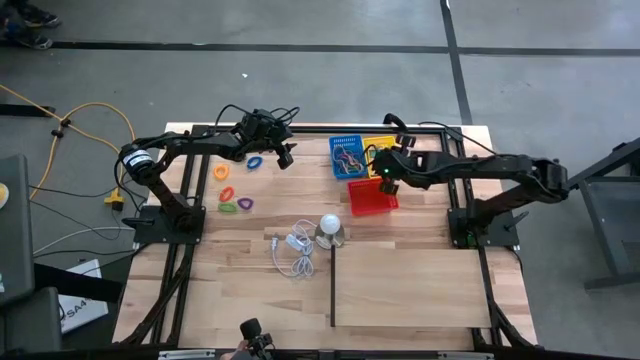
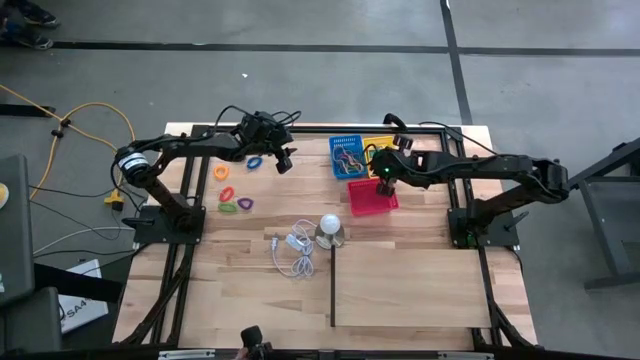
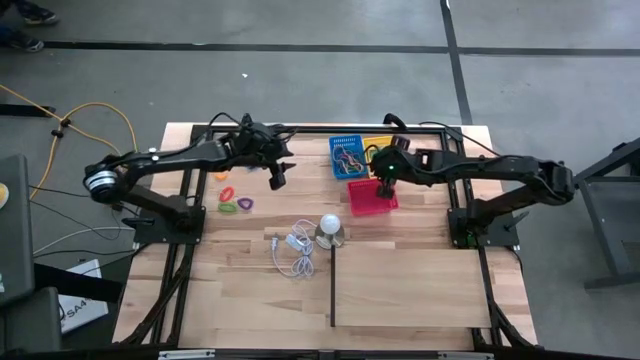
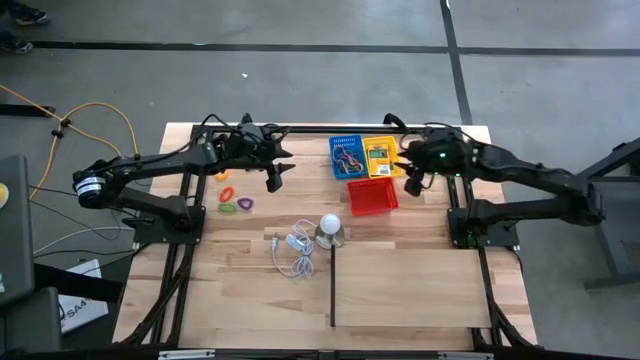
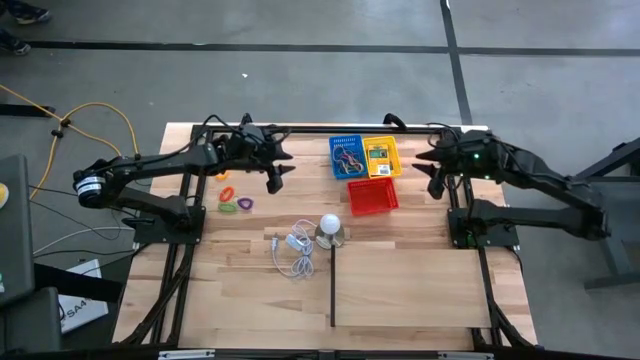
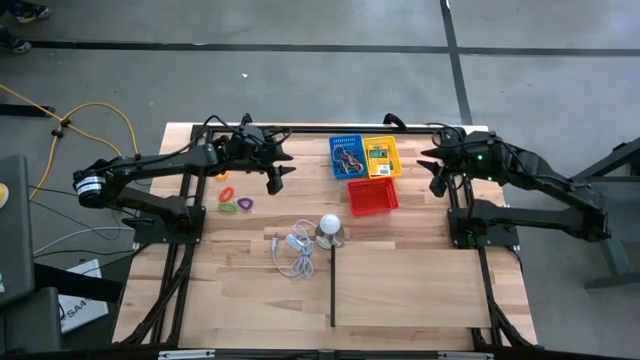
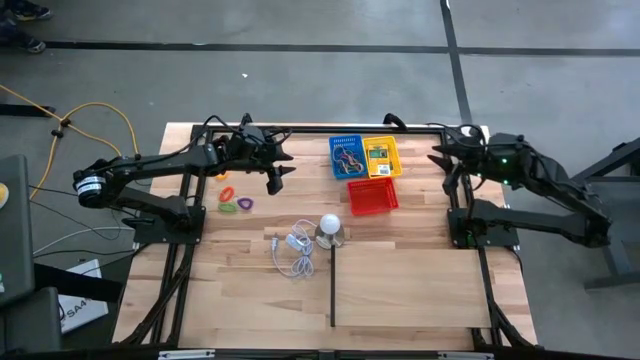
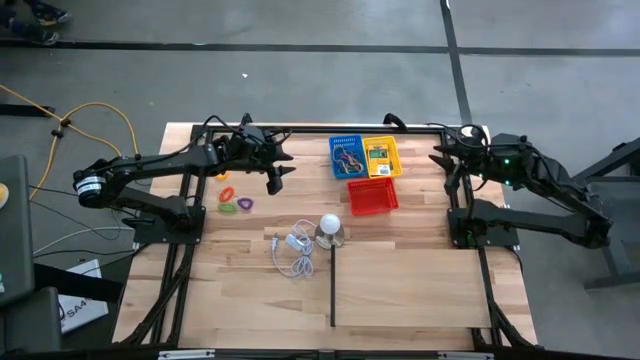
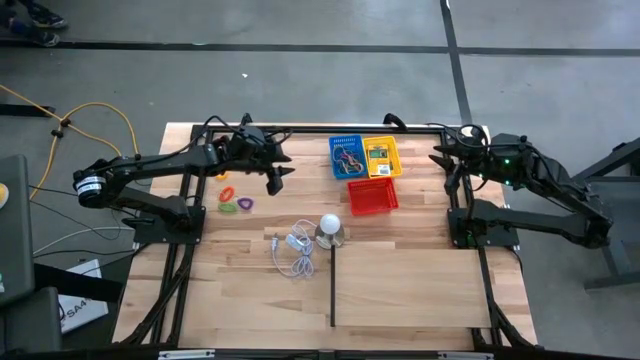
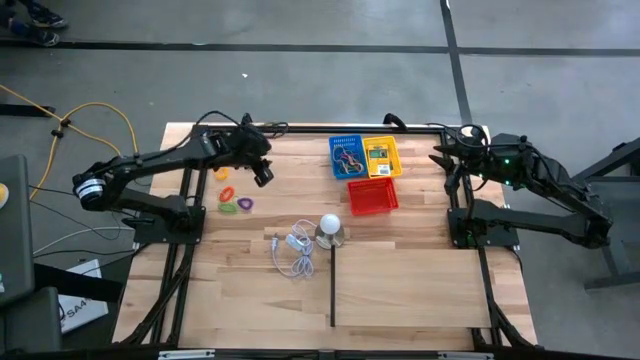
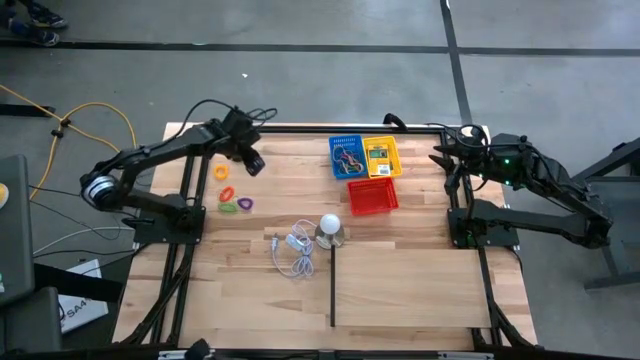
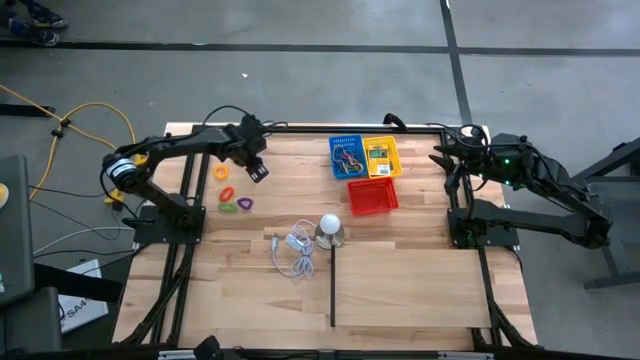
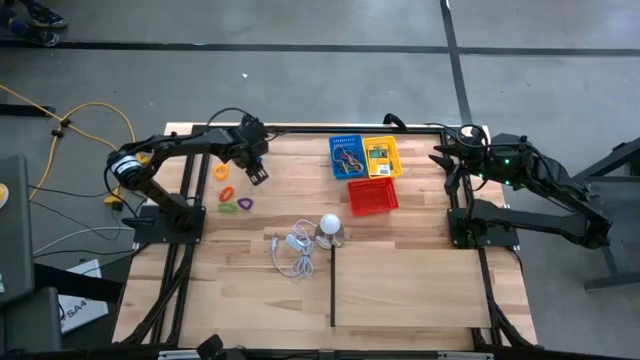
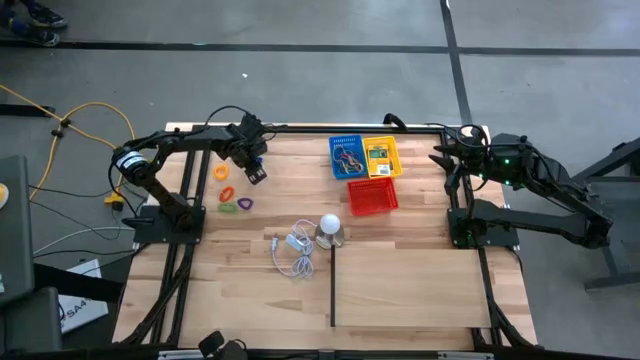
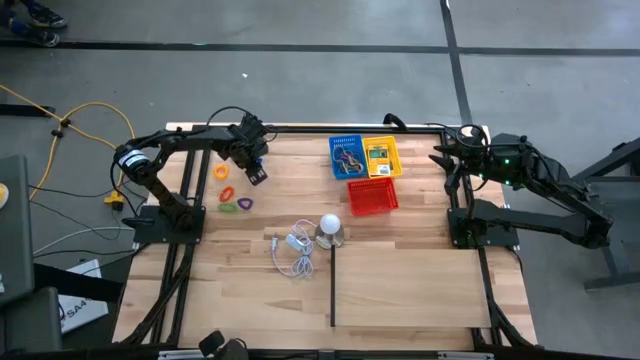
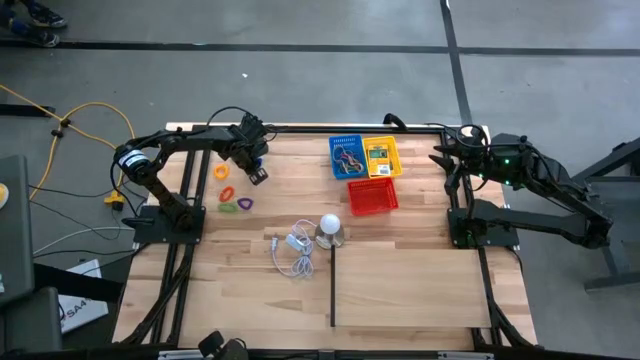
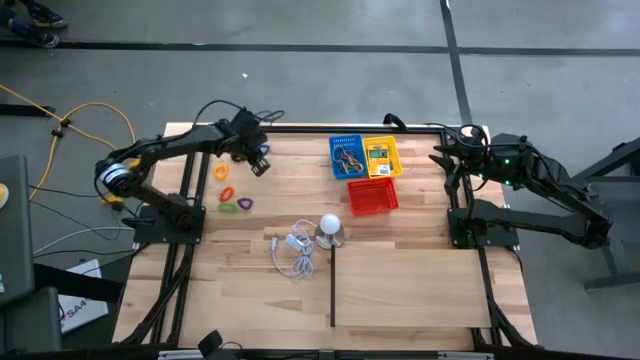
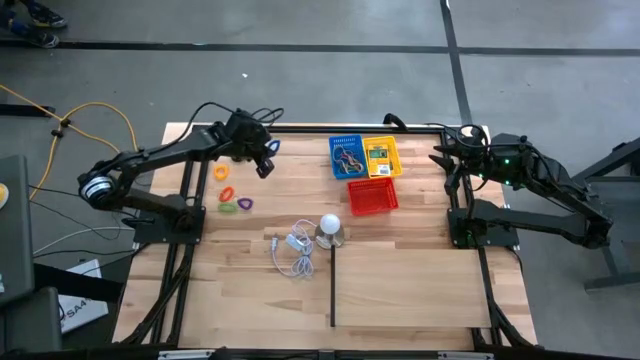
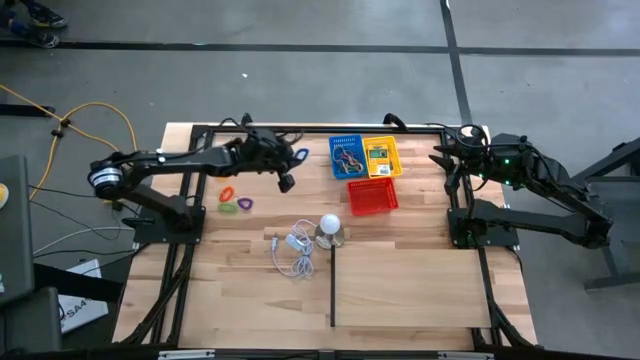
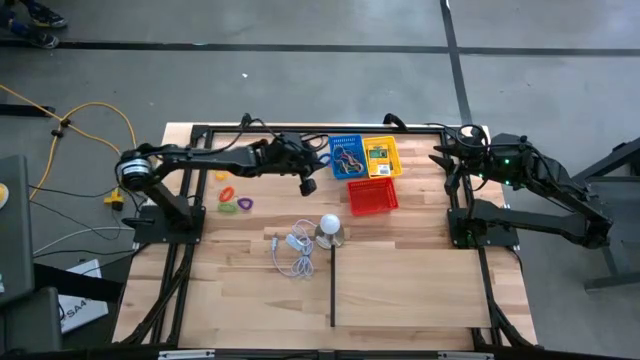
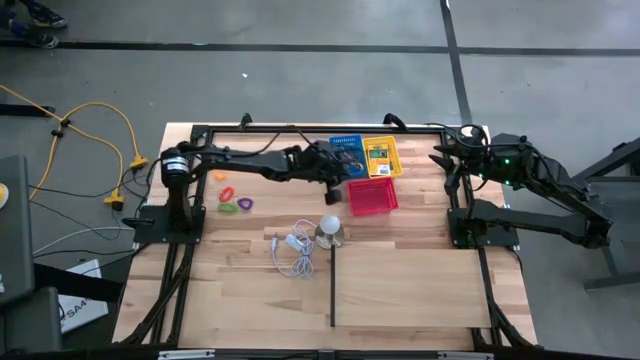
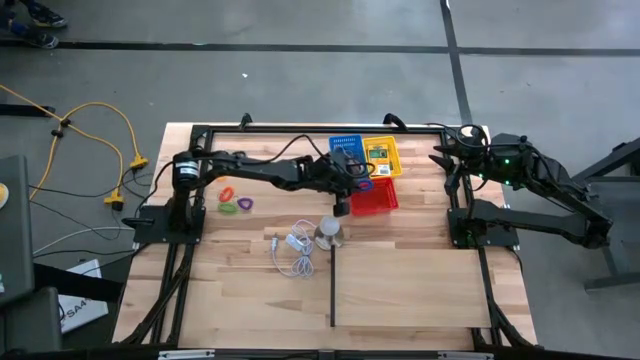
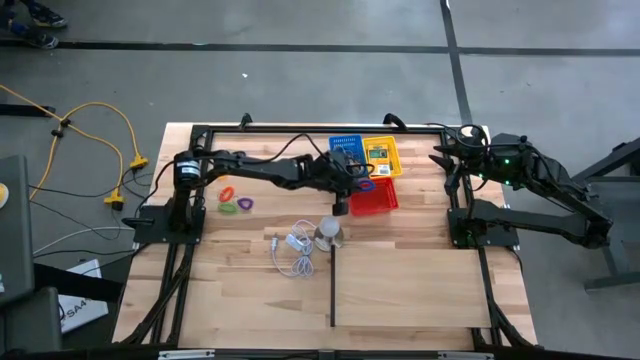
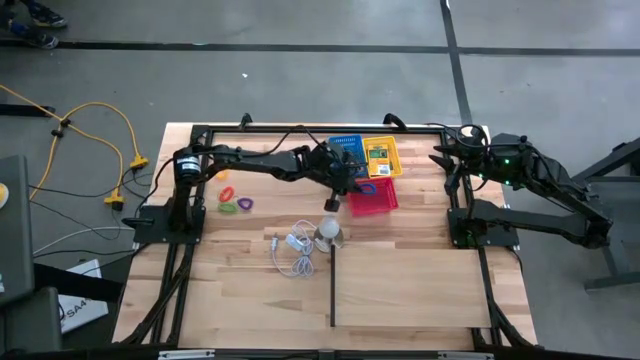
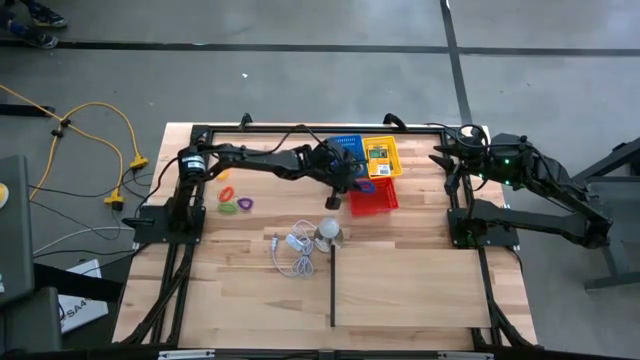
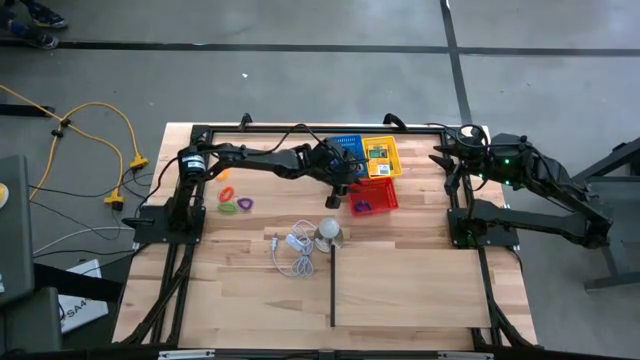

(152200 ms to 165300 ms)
Task: Pick & Place Office Desk Supplies
Put the blue coil keychain into the red bin

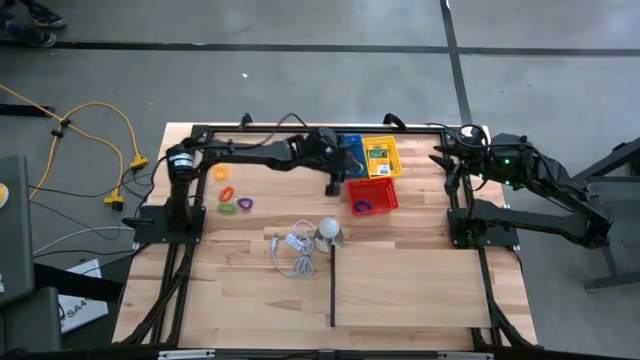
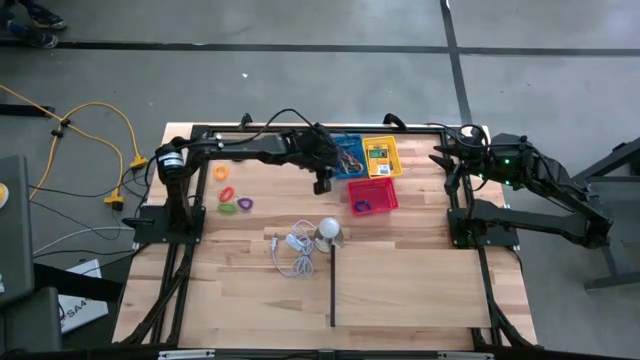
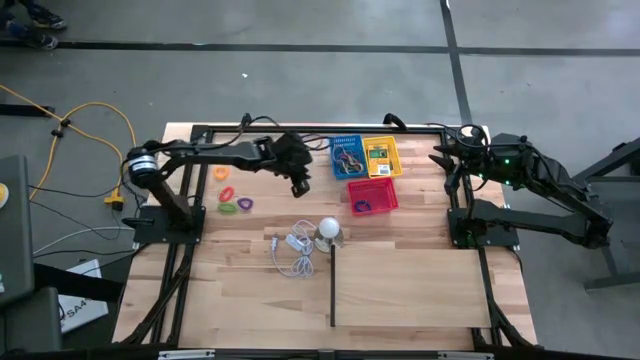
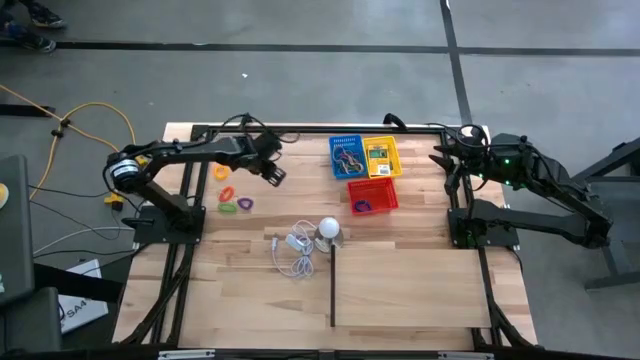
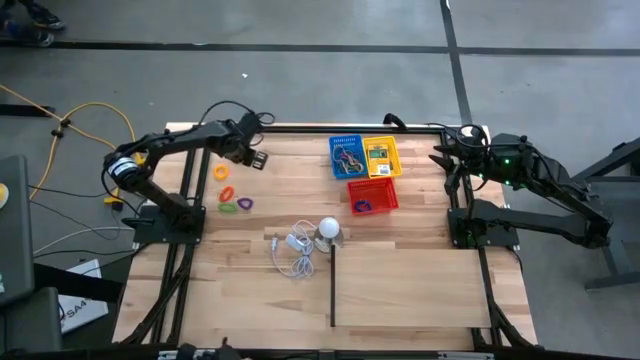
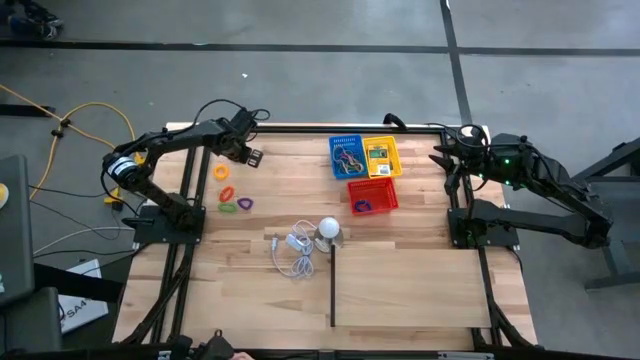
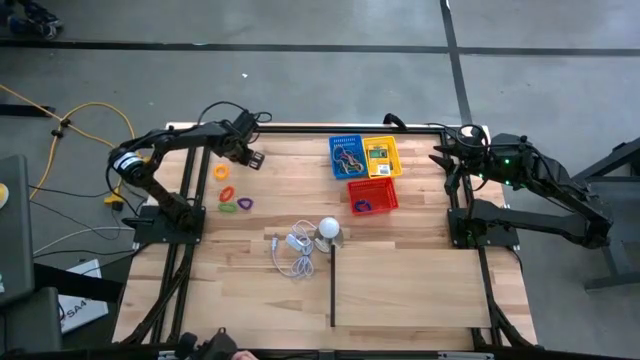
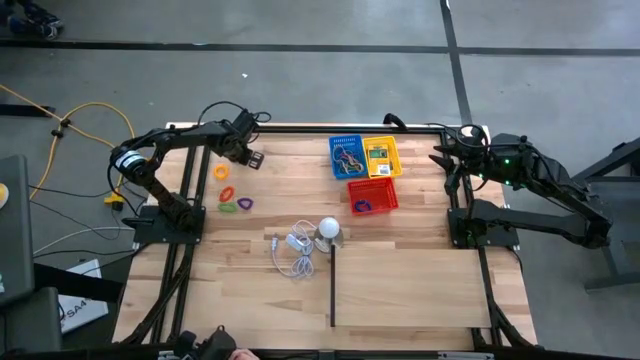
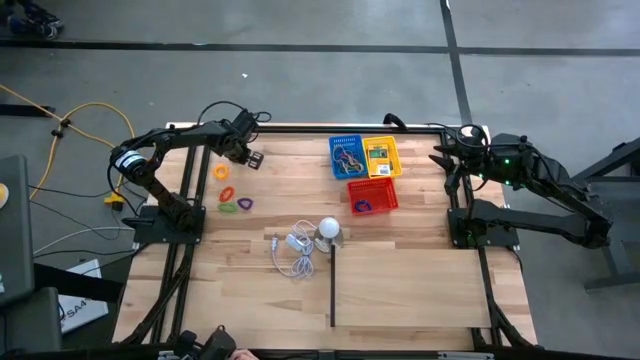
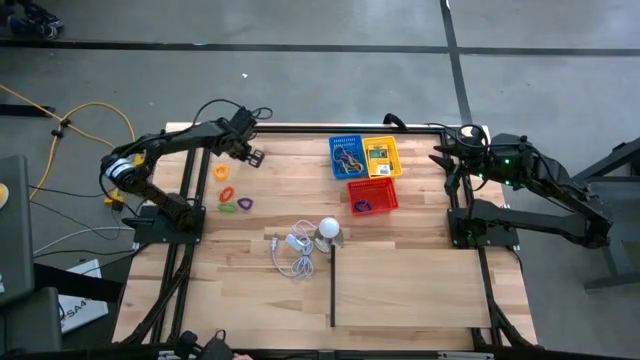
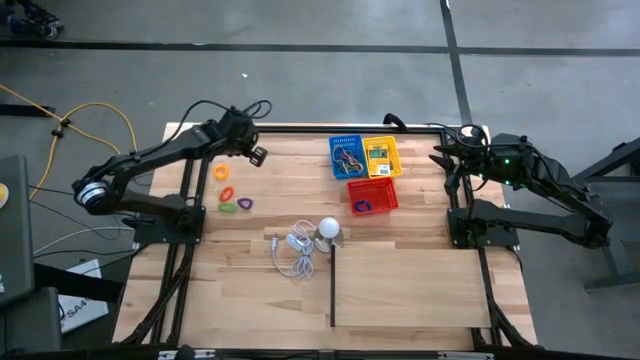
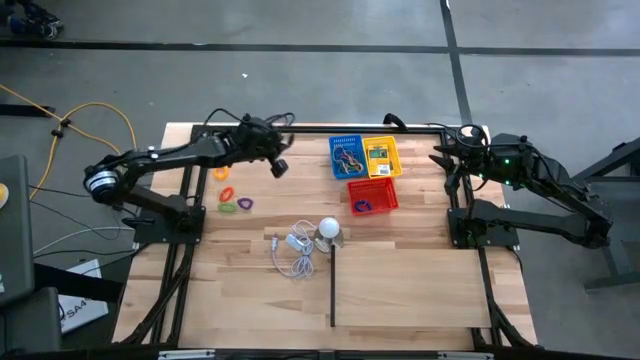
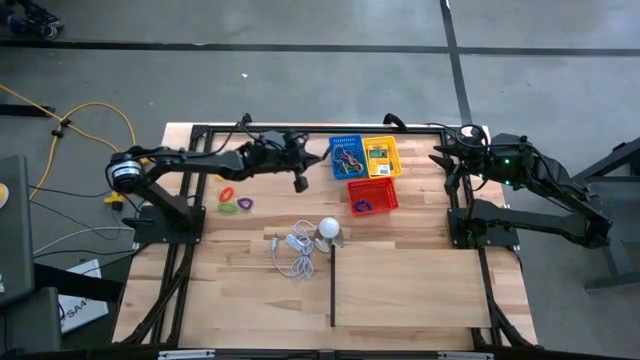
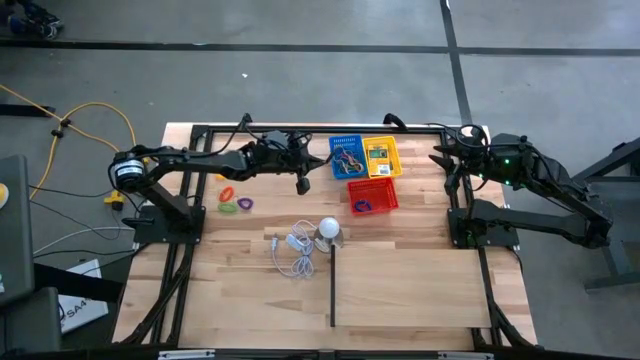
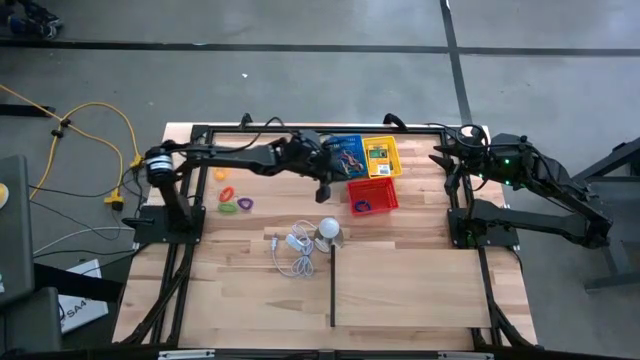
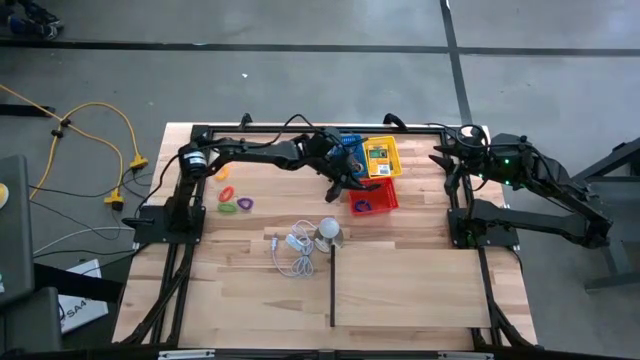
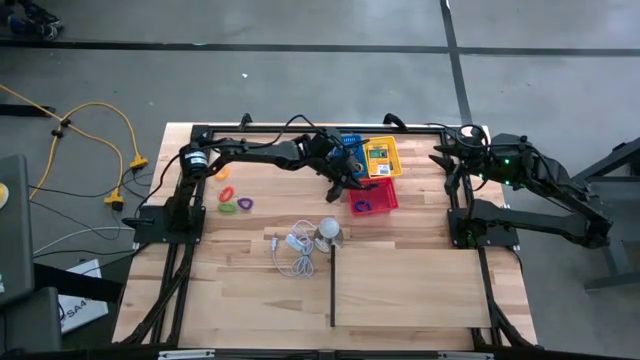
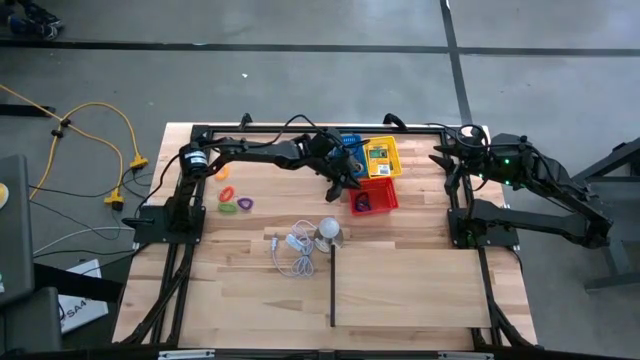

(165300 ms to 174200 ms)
Put the black coil keychain into the red bin

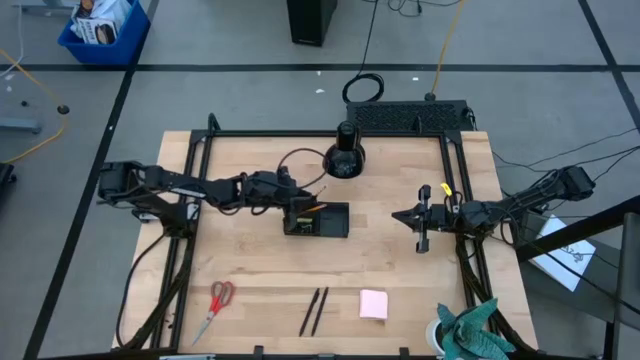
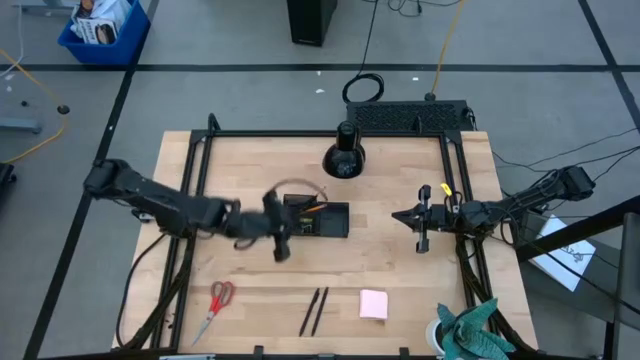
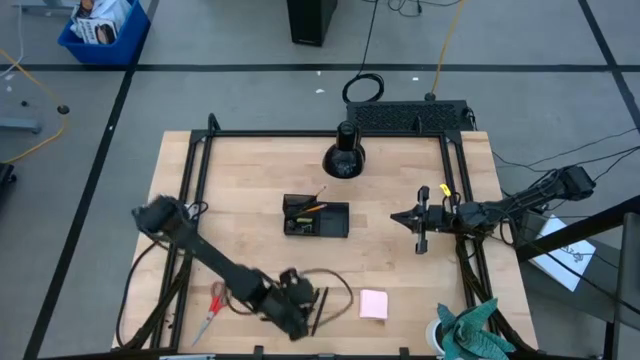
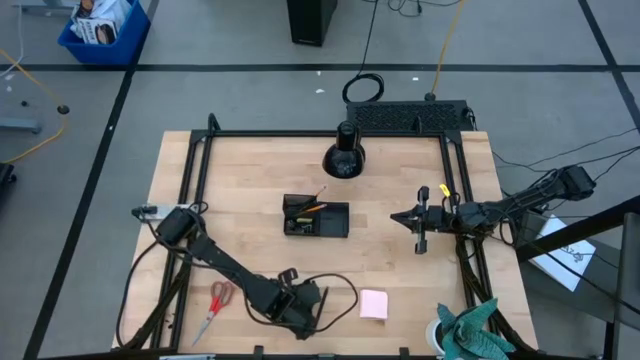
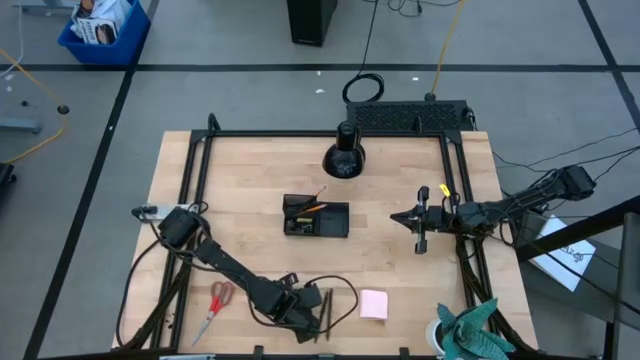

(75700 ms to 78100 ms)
Task: Pick and place office supplies into organizer
Put the left pen into the desk organizer
